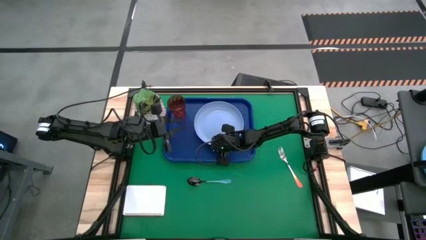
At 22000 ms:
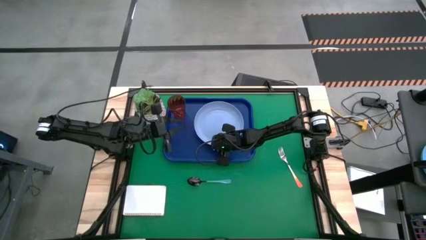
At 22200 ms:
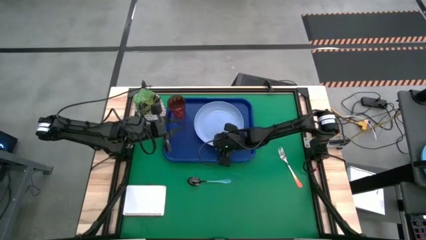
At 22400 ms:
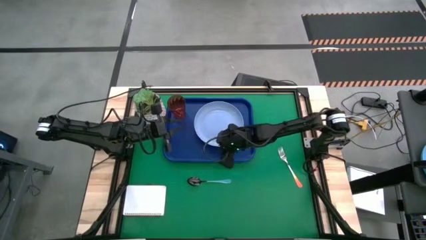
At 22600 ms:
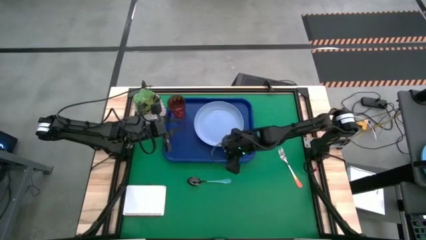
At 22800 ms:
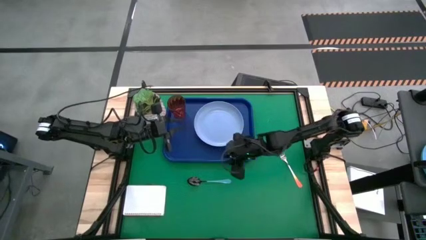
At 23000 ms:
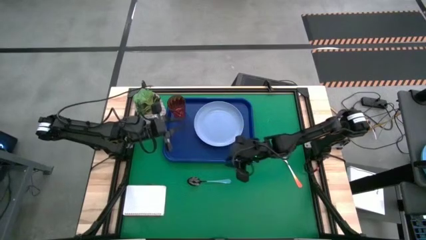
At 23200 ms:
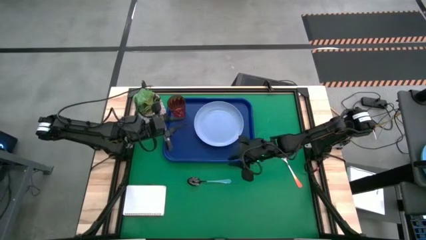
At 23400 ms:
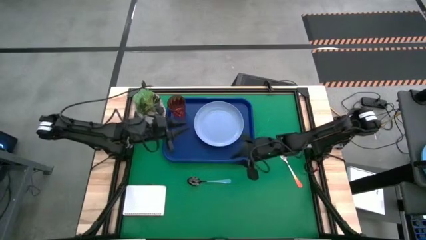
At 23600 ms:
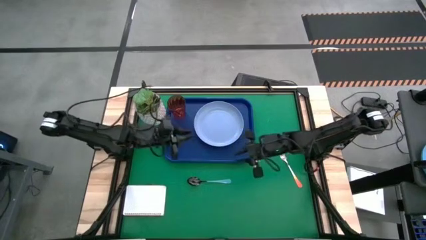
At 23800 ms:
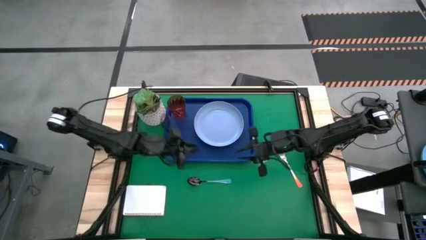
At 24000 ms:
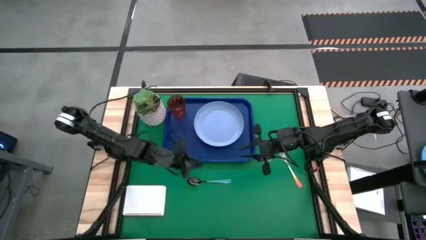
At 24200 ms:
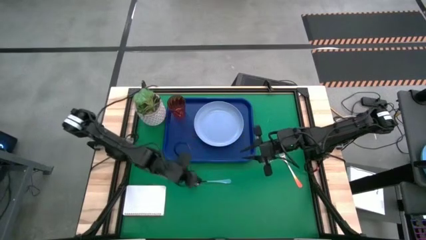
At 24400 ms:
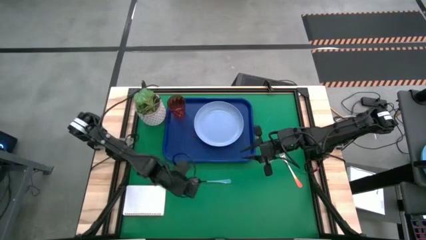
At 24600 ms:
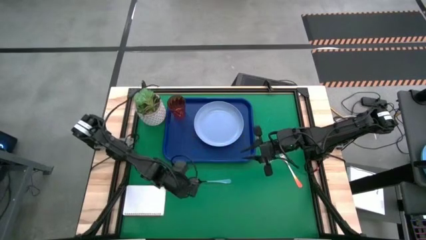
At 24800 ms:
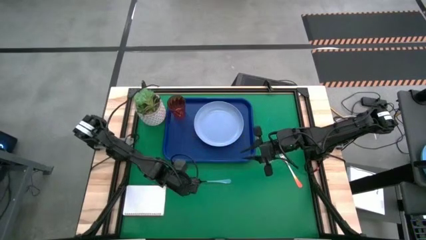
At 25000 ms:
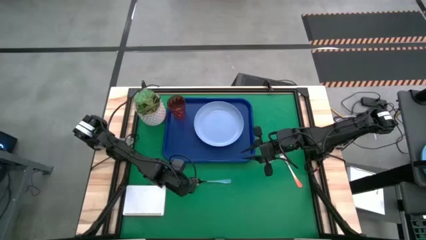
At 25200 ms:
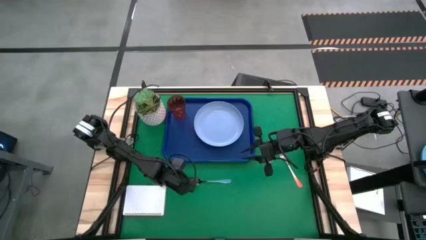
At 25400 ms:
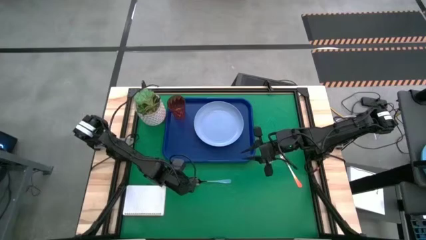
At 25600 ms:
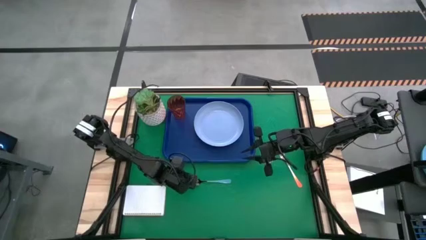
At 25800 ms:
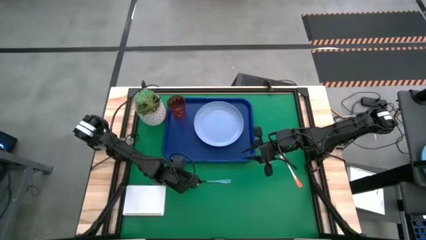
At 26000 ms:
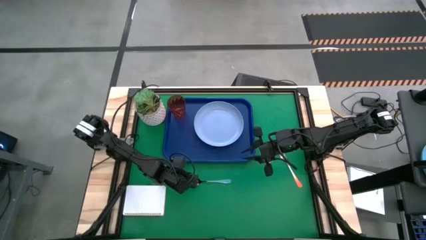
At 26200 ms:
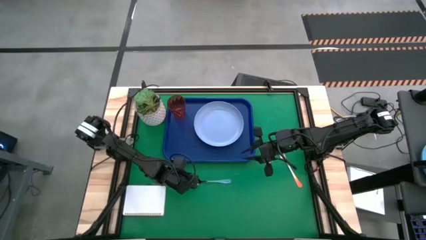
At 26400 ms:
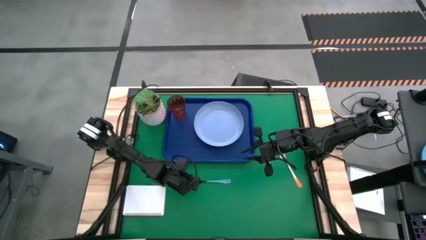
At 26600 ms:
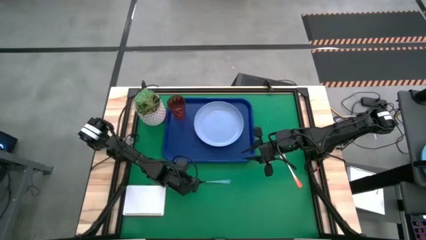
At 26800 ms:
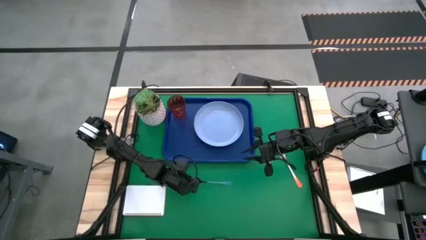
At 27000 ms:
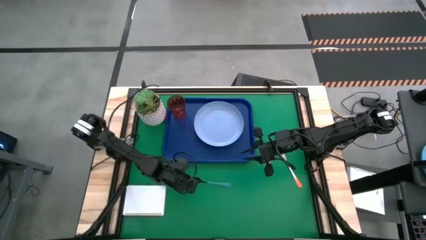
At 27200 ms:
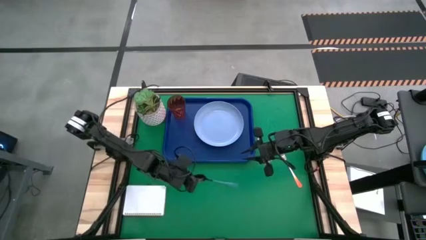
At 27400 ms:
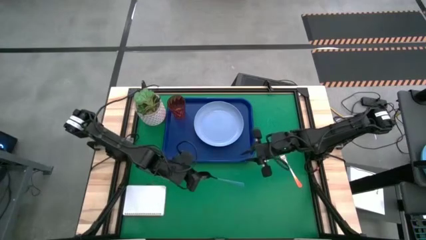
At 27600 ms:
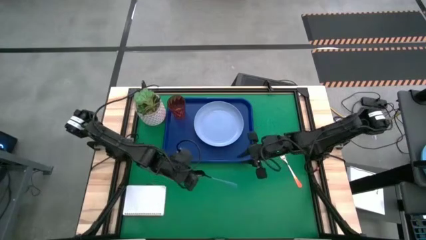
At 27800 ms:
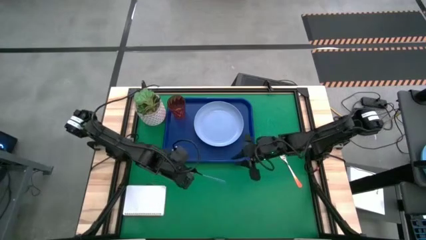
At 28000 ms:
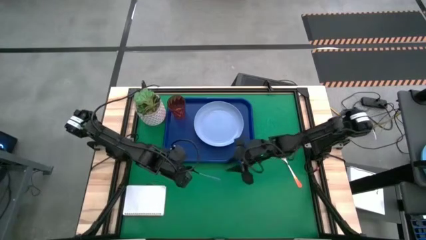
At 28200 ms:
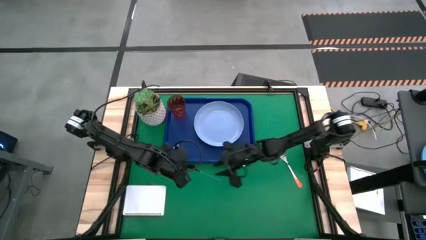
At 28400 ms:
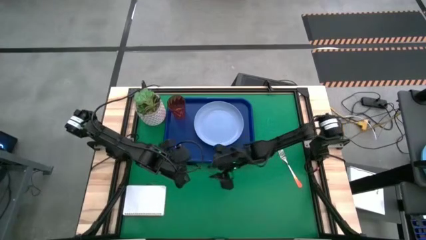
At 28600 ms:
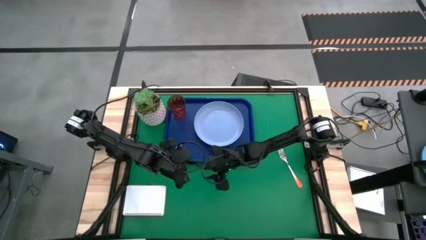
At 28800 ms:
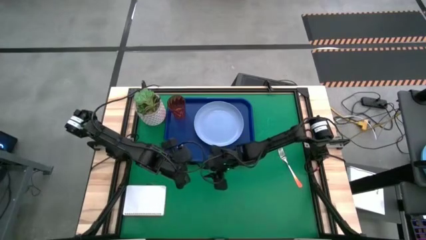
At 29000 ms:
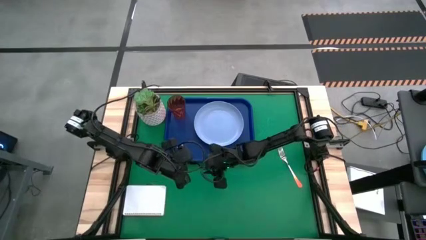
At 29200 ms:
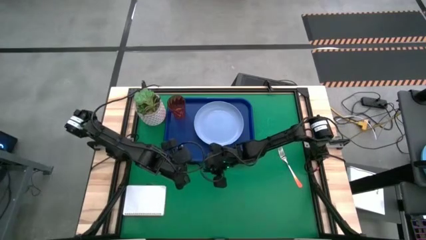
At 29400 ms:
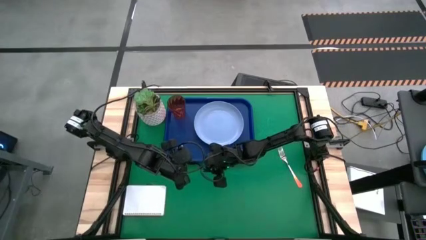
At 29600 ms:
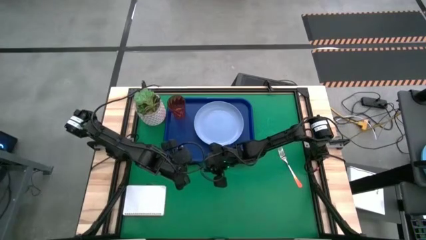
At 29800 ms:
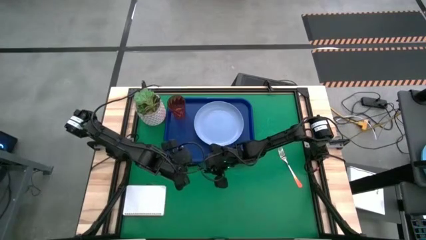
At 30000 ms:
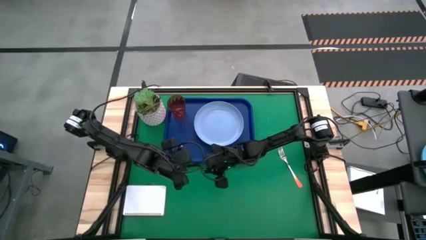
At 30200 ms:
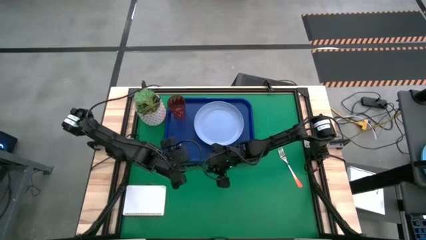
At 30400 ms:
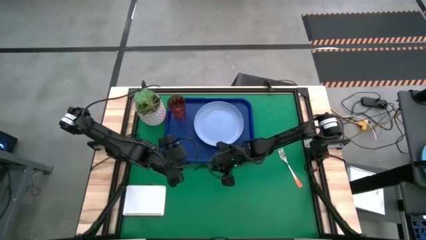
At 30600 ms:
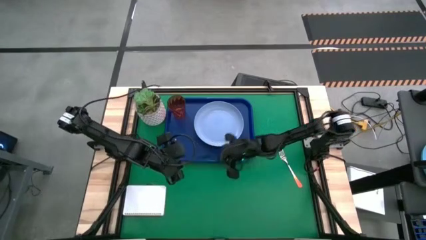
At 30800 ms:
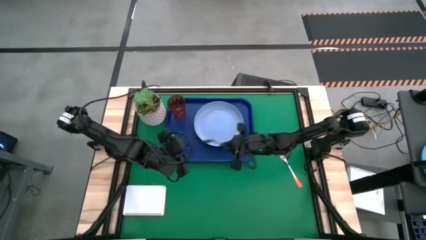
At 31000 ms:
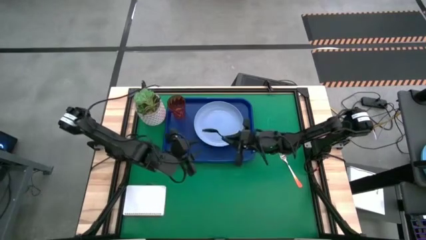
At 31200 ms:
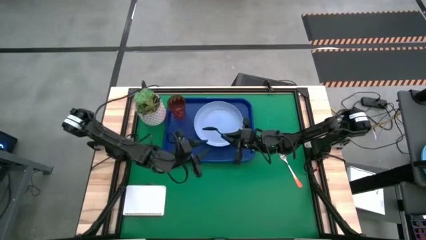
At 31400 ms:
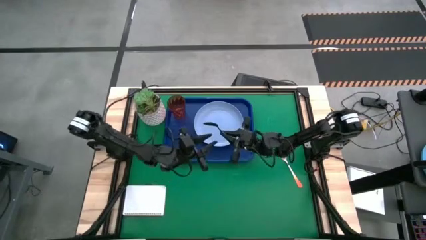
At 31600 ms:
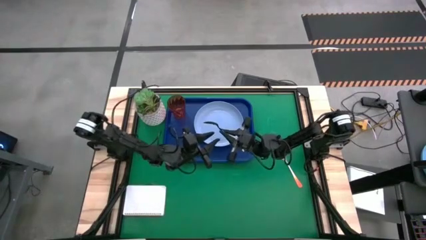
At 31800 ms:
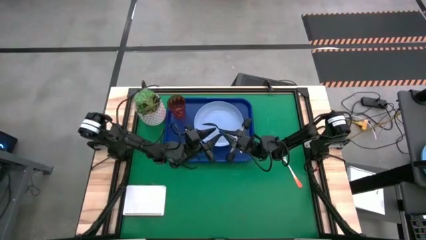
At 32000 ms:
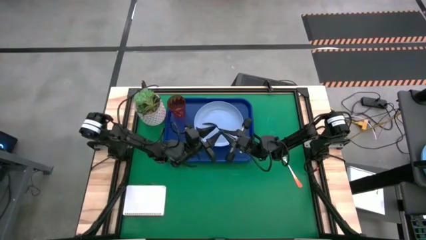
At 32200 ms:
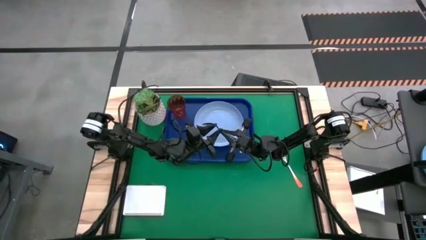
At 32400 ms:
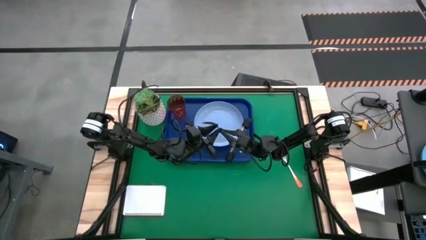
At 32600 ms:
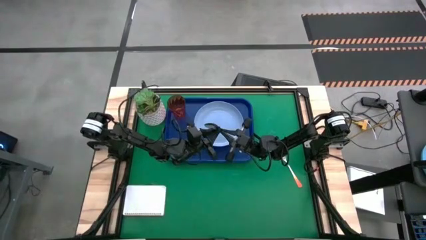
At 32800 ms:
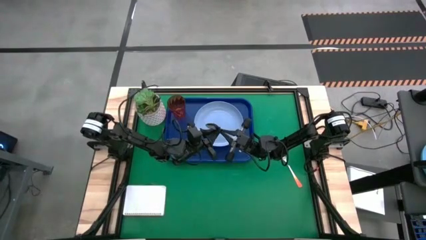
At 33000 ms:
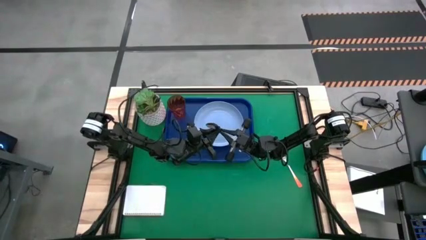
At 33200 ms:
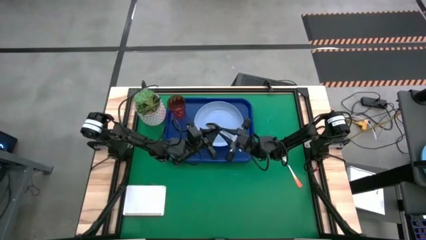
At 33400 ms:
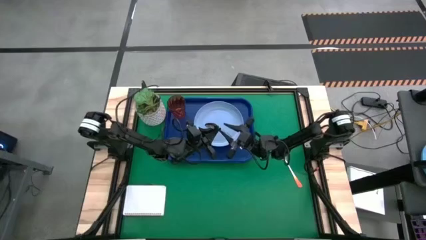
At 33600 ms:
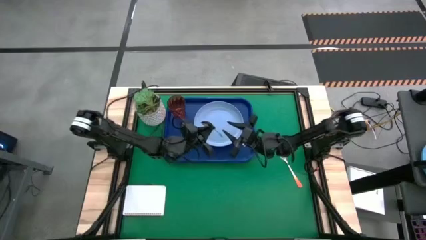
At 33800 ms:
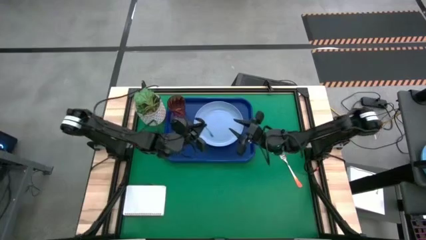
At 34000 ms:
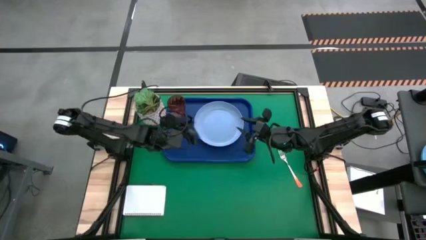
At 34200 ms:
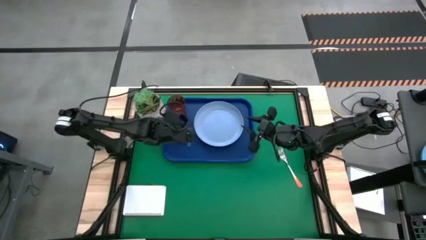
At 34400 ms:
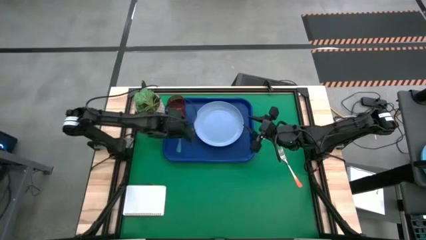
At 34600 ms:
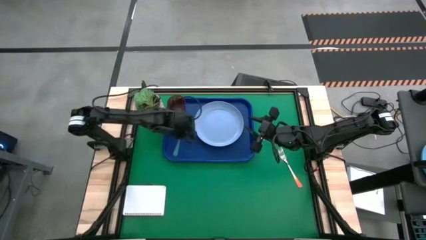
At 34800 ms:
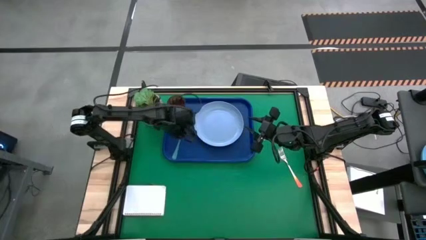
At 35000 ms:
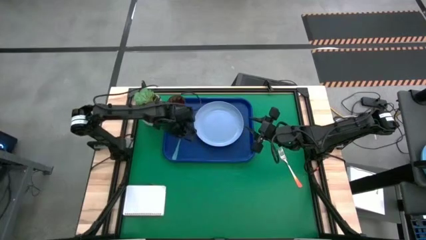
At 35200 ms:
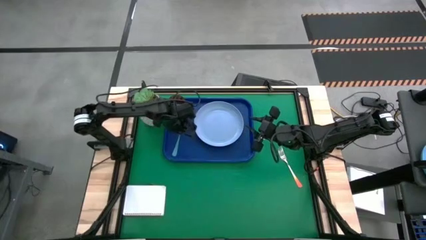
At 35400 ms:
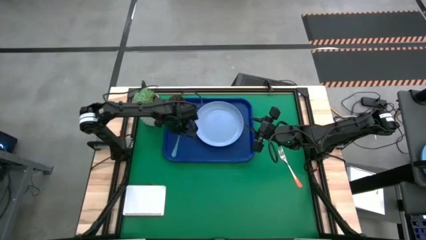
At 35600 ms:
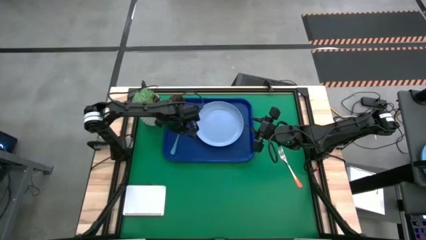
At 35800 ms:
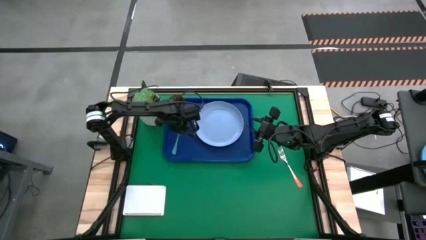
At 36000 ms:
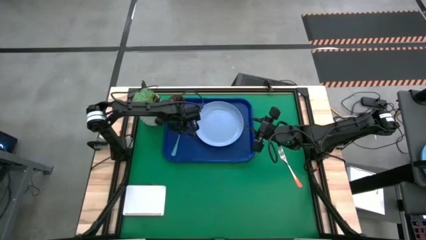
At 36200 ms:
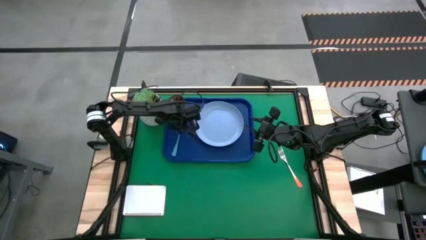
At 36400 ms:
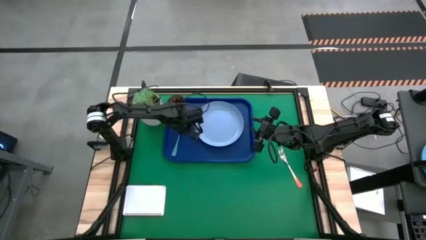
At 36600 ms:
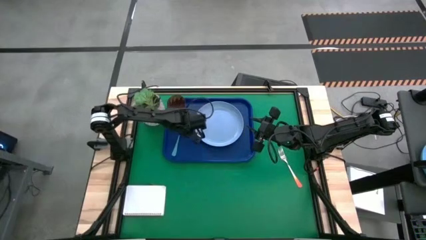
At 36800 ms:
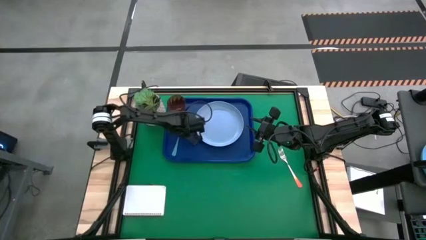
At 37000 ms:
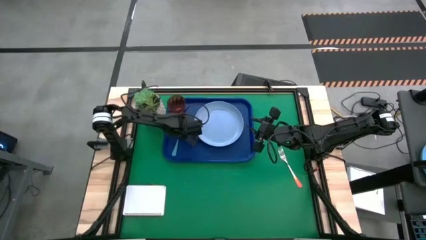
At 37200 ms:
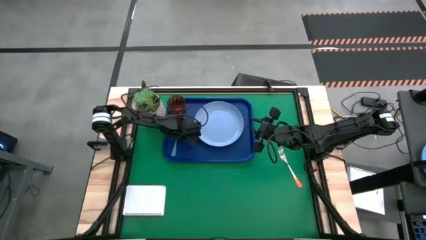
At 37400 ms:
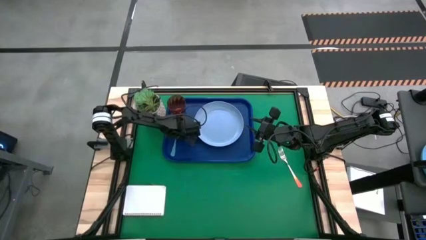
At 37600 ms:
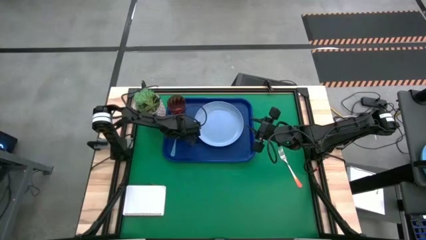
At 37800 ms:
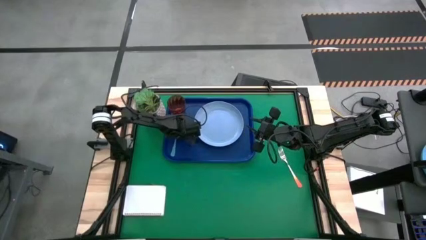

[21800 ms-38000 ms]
Task: Pick and place plate/cup/fork/spoon on tray
Put the blue spoon on the blue tray to the left of the blue plate
